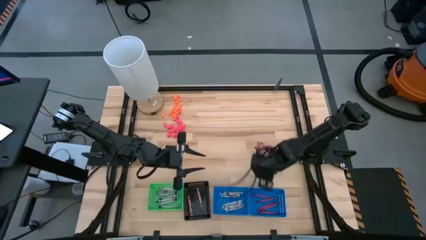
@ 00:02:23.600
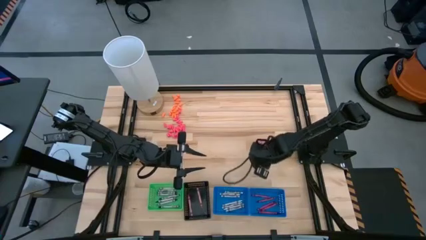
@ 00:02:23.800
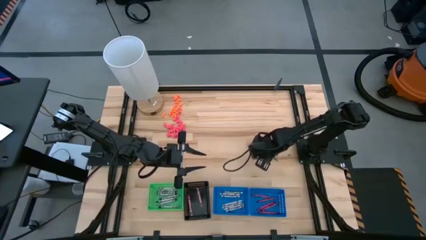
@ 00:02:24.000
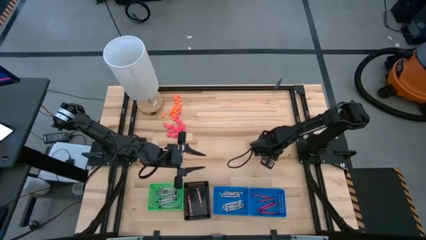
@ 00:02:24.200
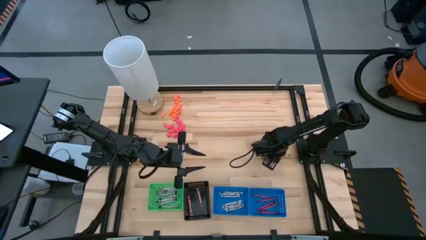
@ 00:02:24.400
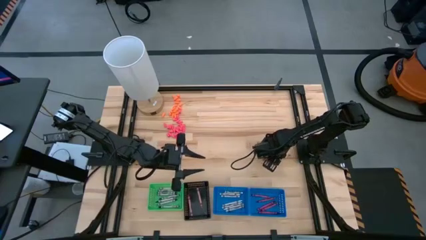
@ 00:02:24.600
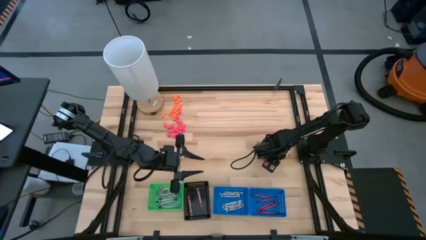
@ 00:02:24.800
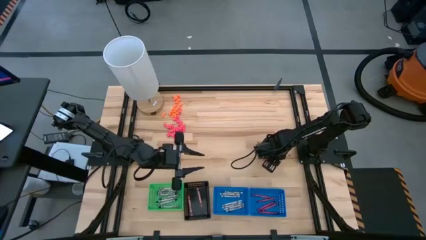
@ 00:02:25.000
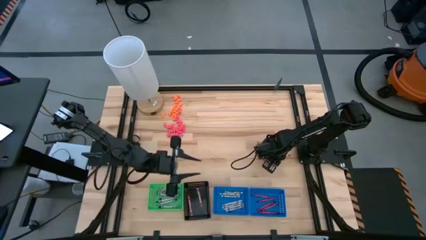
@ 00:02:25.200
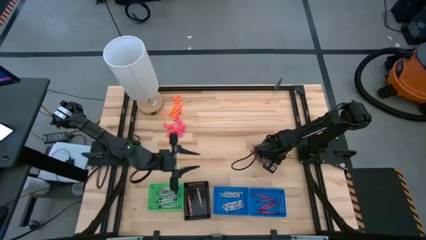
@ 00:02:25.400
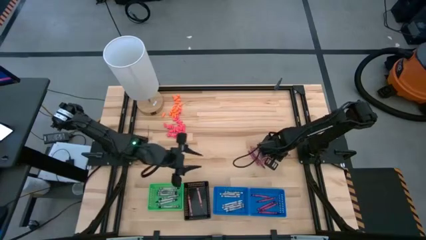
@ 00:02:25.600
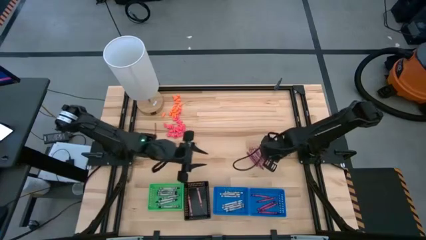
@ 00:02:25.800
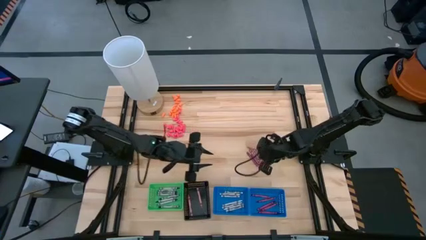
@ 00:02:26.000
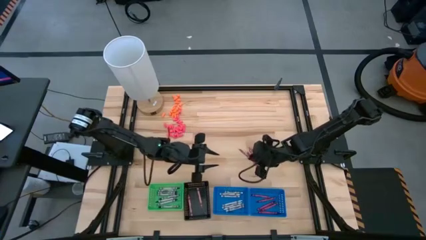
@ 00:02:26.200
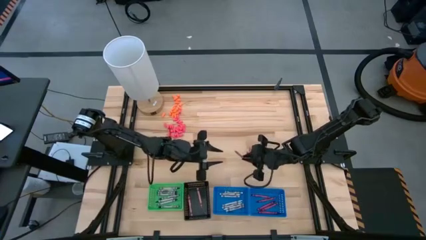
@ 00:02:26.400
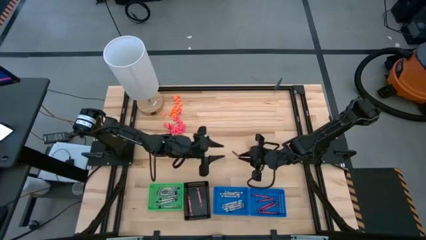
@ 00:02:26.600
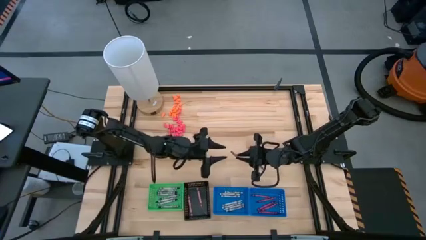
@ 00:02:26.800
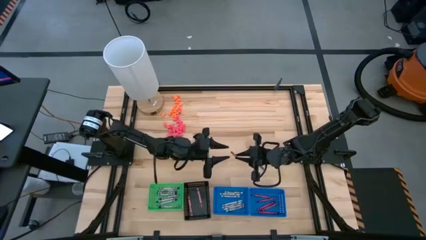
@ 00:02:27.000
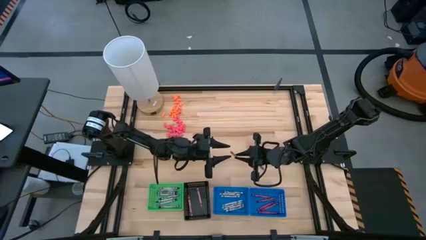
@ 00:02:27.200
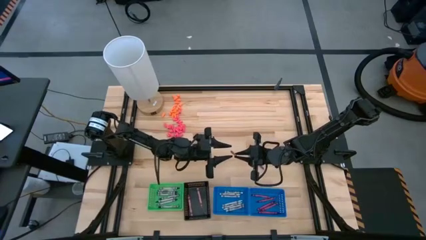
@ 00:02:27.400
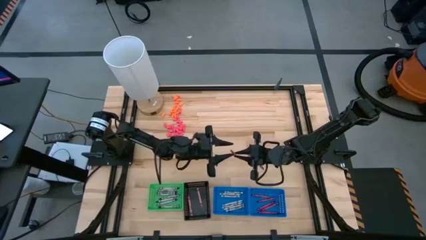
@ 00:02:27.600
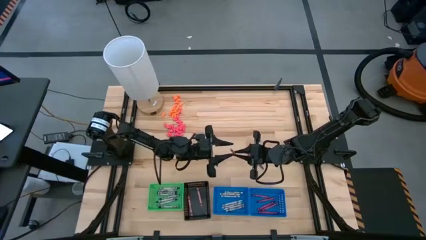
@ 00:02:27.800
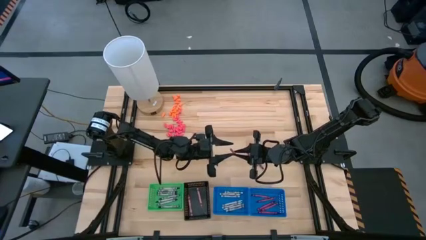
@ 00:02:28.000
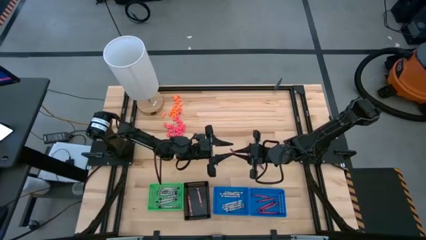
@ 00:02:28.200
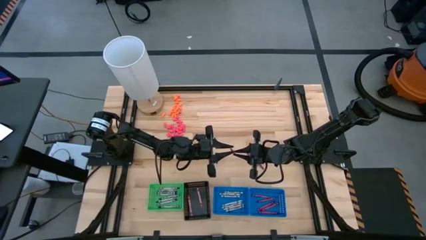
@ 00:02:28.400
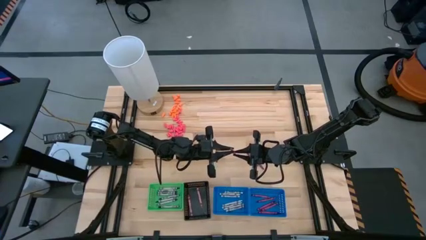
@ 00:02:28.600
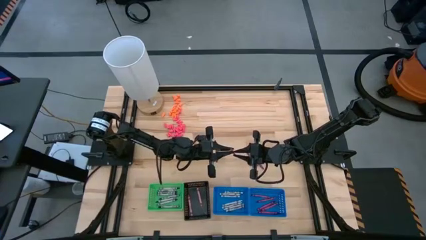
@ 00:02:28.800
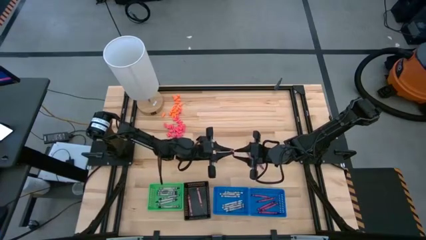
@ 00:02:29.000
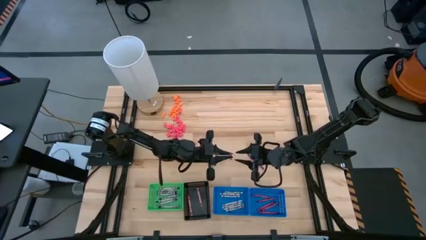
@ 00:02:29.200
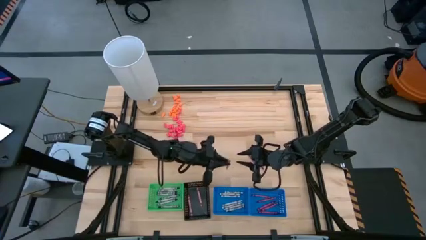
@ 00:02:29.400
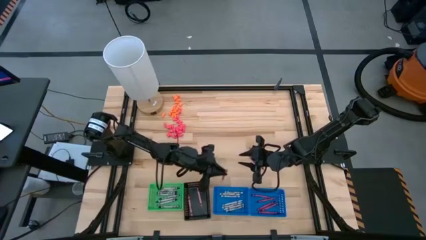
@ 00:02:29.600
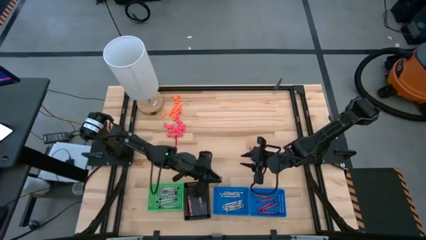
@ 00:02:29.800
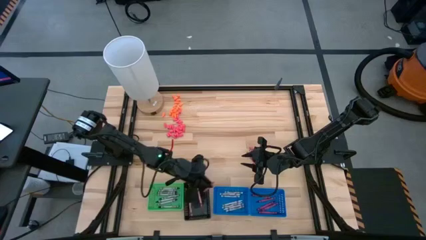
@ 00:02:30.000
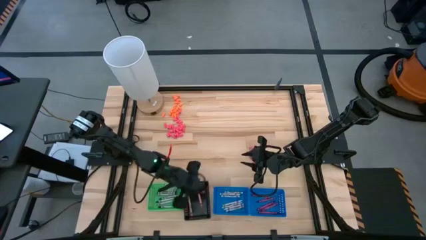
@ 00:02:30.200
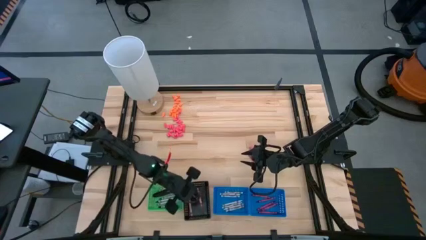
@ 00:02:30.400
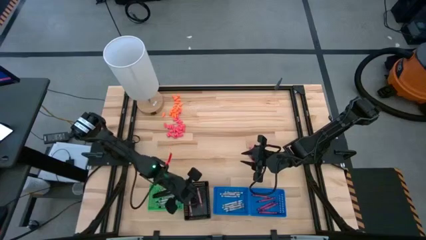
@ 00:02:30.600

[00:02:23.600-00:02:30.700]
Task: Sort crayons
Put the pink crayon into the black bin

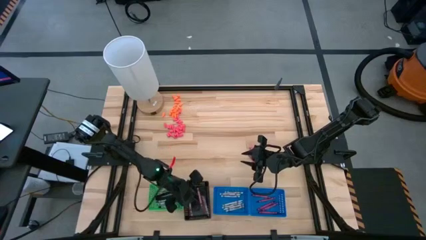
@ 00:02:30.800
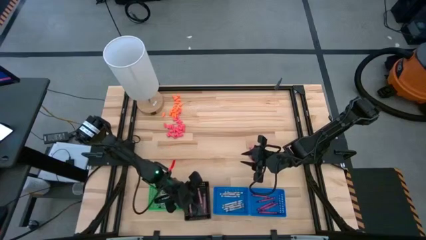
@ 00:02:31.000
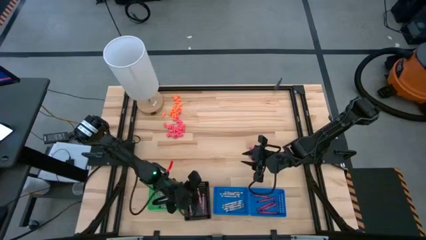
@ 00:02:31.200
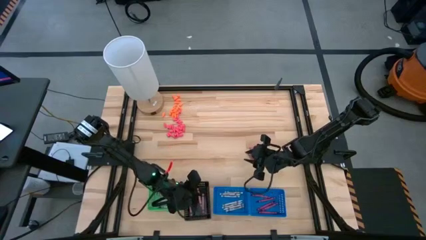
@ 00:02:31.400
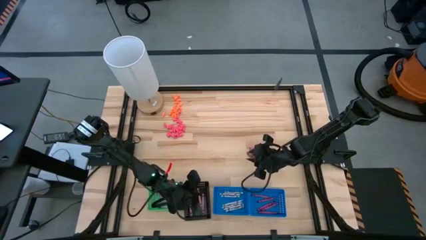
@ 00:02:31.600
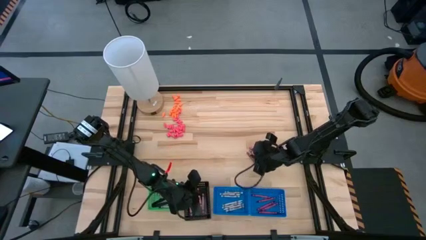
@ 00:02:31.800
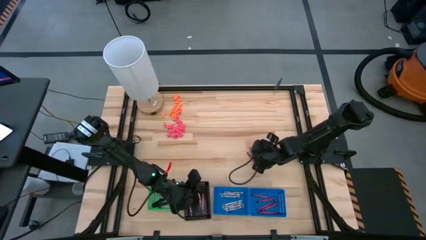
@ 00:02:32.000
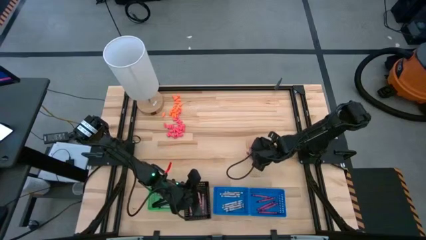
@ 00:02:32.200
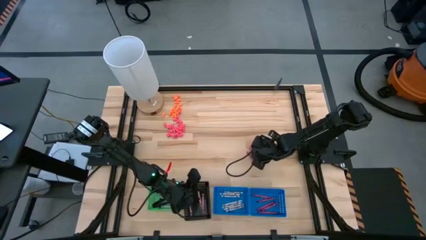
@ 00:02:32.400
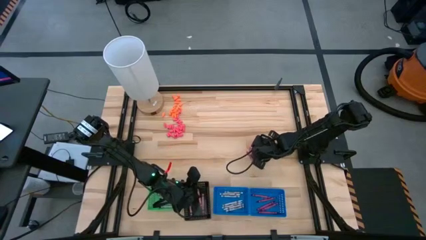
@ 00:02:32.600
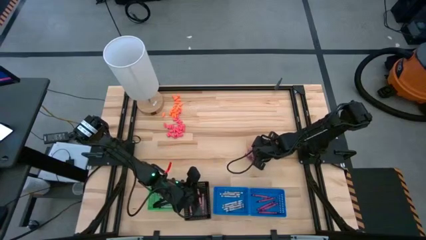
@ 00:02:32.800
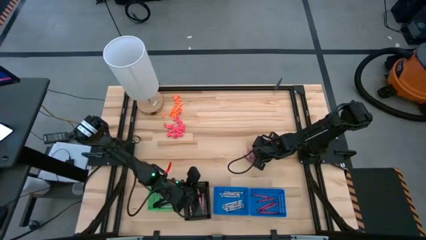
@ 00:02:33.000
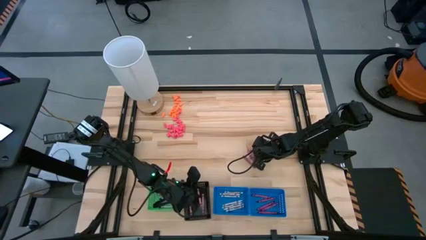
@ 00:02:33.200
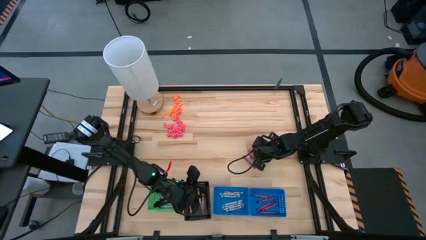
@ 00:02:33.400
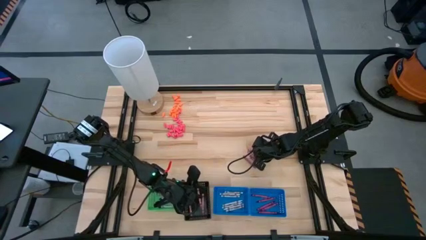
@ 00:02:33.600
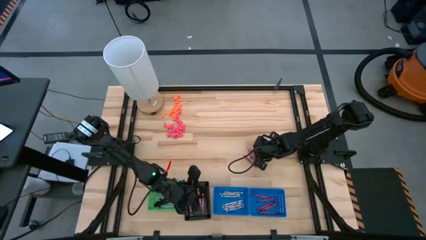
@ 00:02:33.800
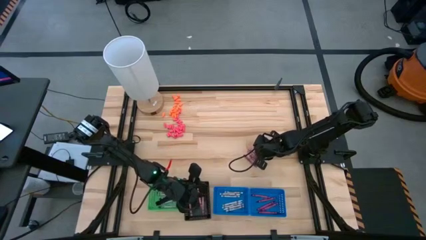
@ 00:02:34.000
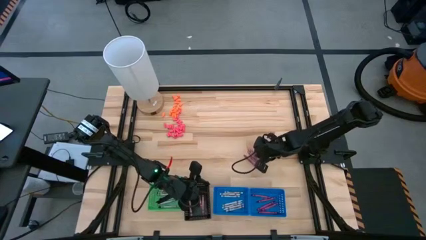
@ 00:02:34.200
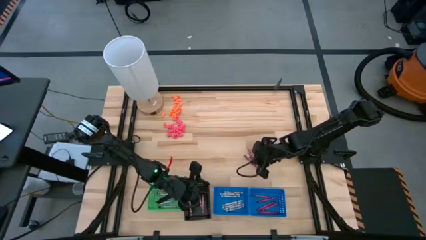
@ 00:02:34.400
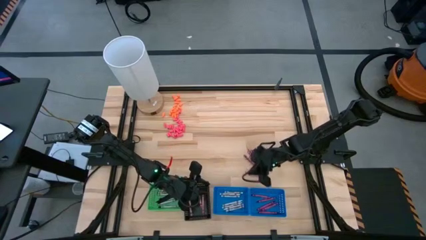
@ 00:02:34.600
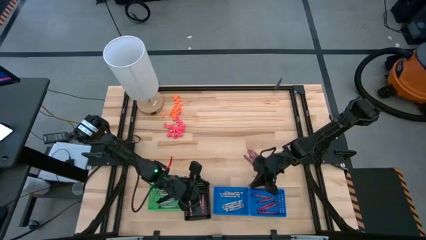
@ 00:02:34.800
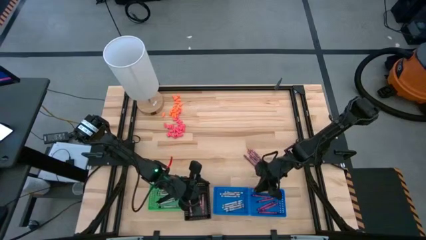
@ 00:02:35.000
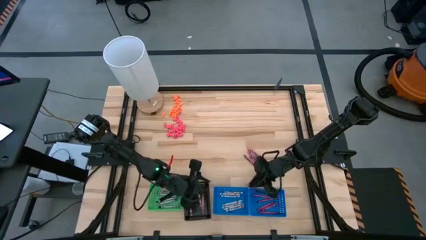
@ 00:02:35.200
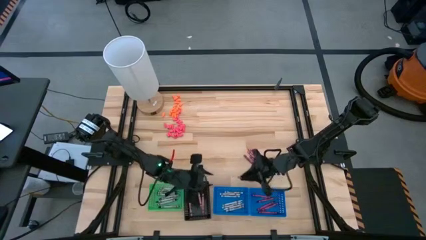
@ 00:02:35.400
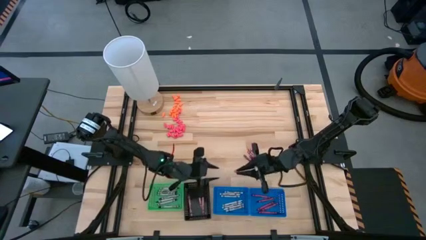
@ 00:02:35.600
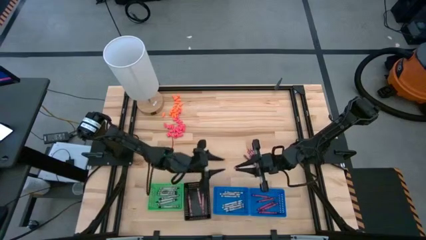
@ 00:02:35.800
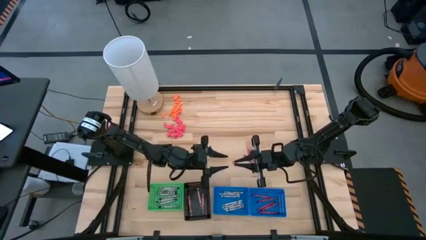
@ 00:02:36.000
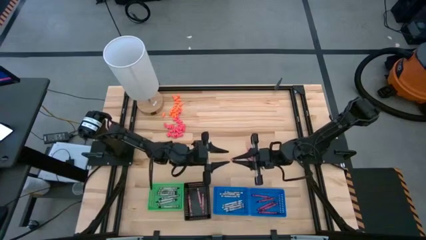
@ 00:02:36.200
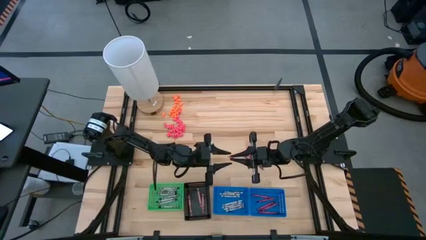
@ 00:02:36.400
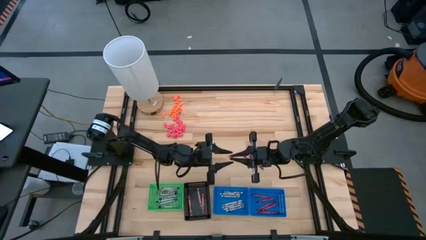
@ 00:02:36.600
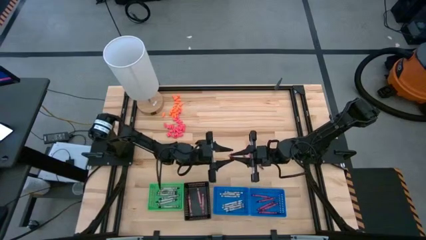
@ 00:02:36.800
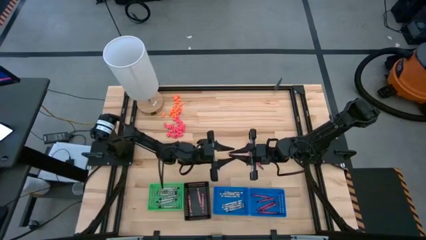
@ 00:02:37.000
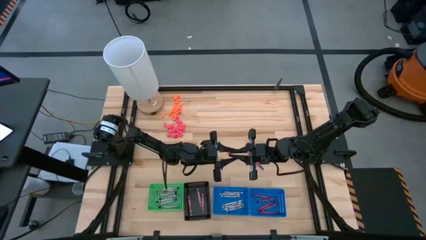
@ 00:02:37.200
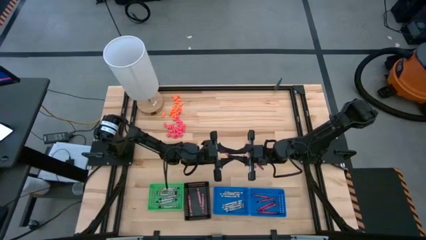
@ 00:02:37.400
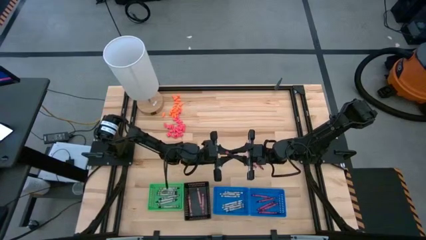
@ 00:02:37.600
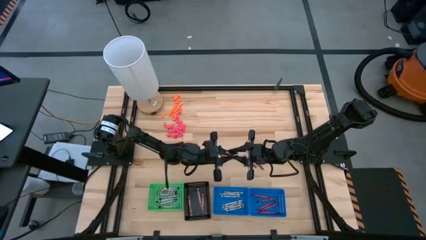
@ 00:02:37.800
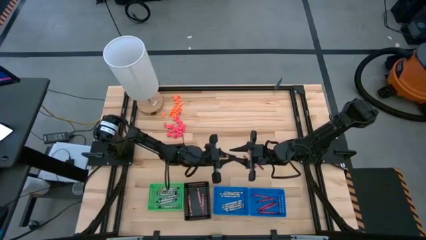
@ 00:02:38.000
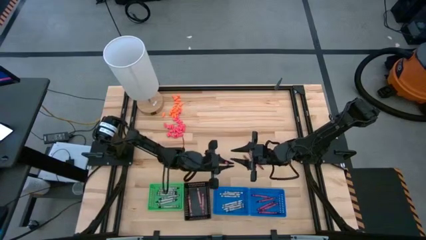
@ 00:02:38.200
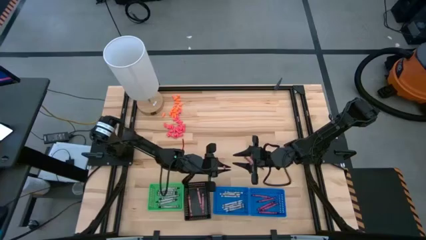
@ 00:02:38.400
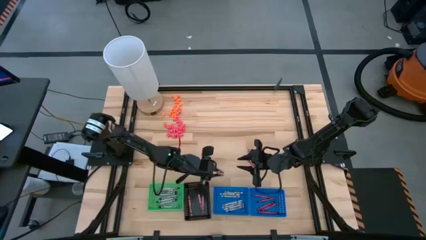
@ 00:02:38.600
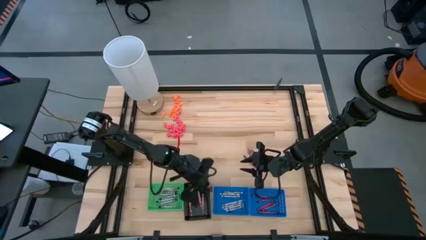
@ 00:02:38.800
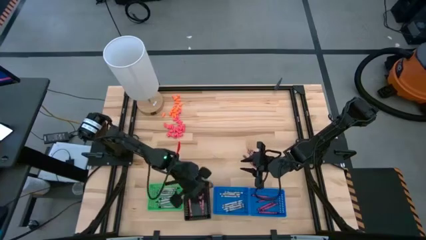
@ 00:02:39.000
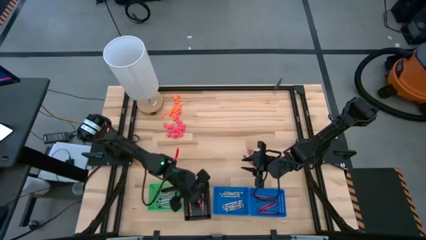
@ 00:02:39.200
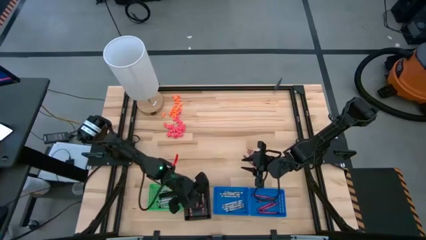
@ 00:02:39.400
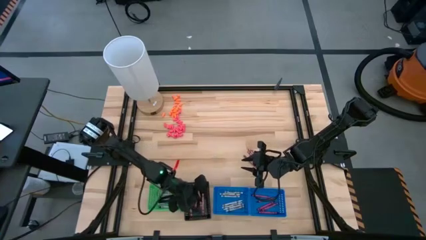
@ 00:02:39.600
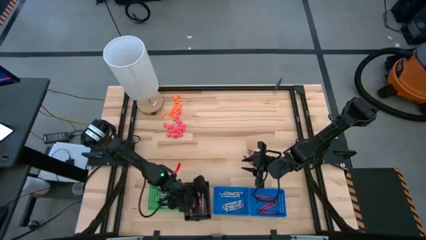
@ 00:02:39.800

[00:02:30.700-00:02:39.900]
Put the pink crayon into the black bin
